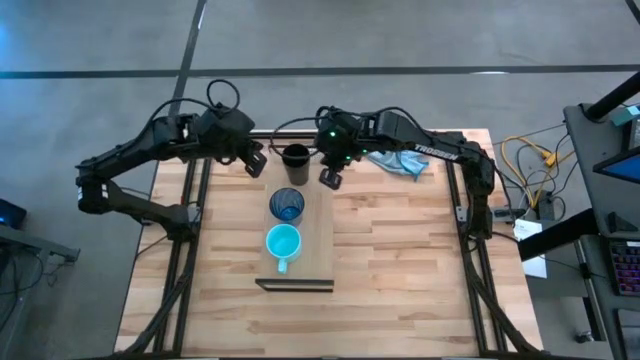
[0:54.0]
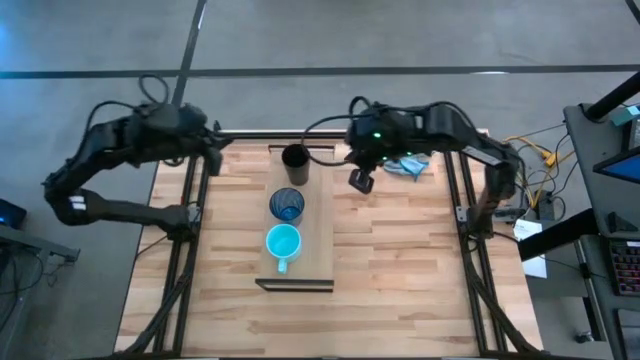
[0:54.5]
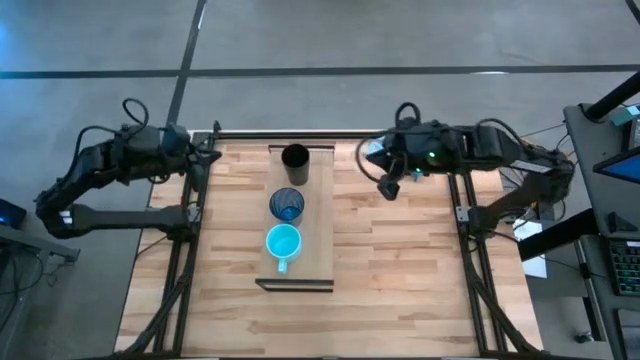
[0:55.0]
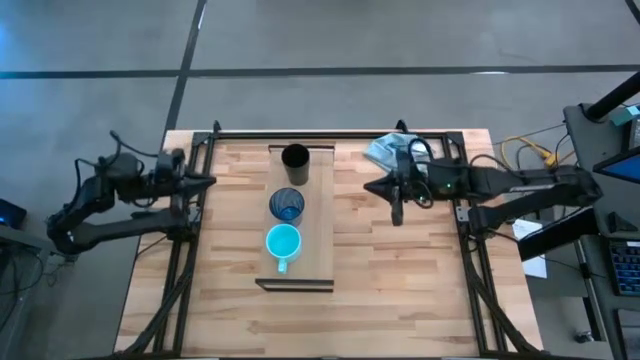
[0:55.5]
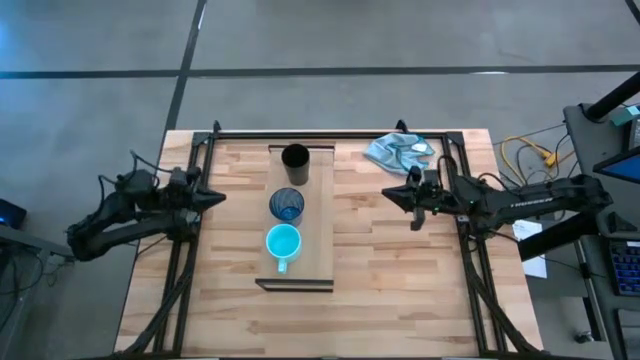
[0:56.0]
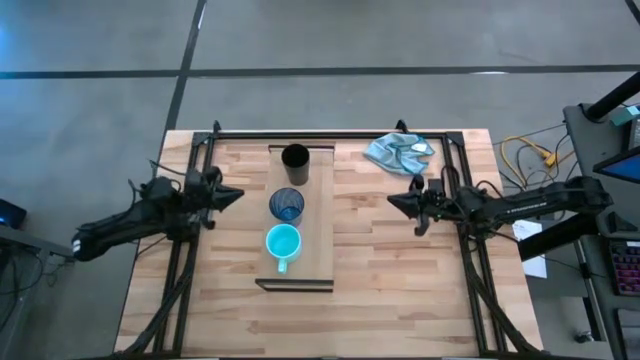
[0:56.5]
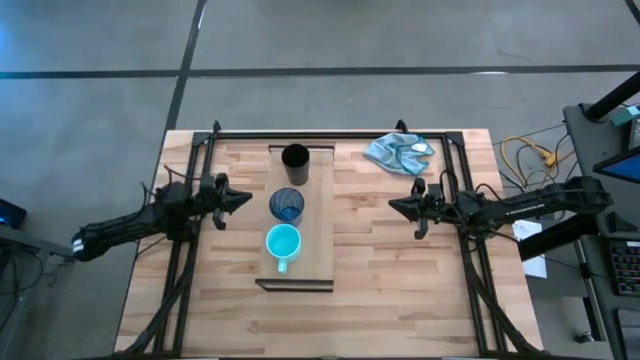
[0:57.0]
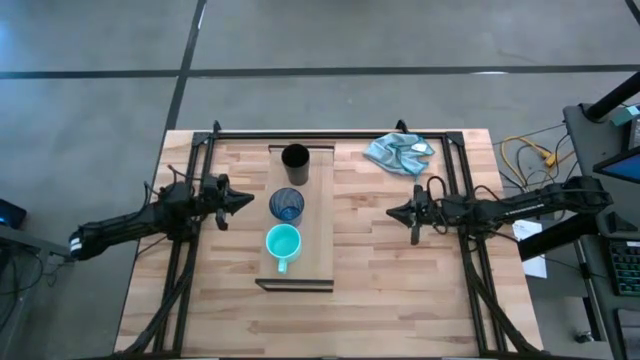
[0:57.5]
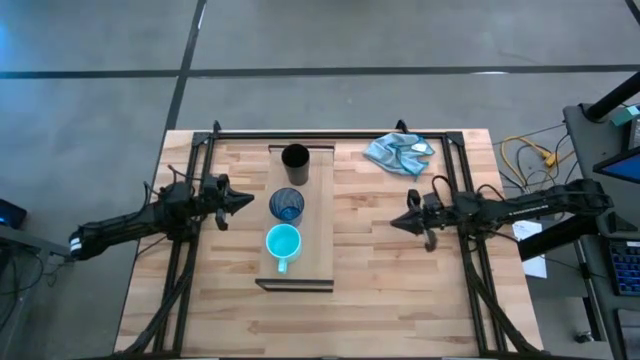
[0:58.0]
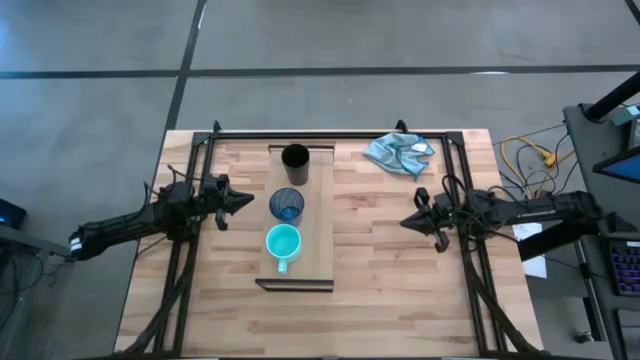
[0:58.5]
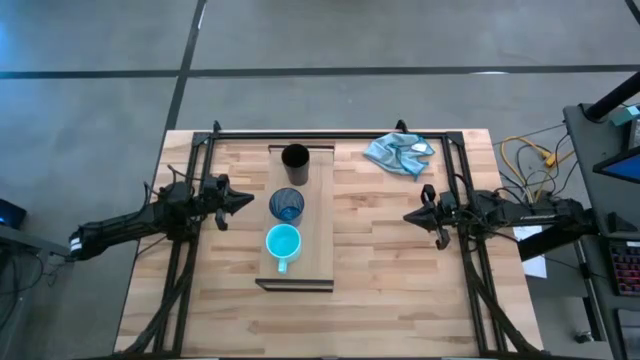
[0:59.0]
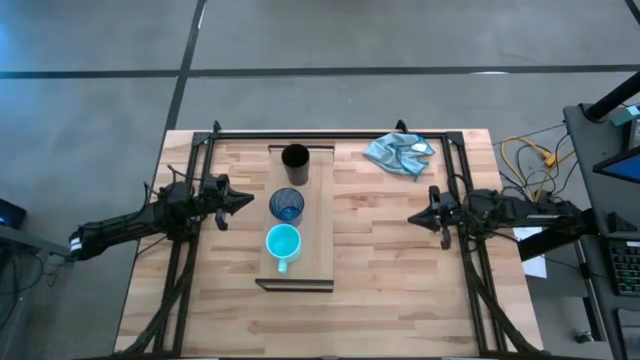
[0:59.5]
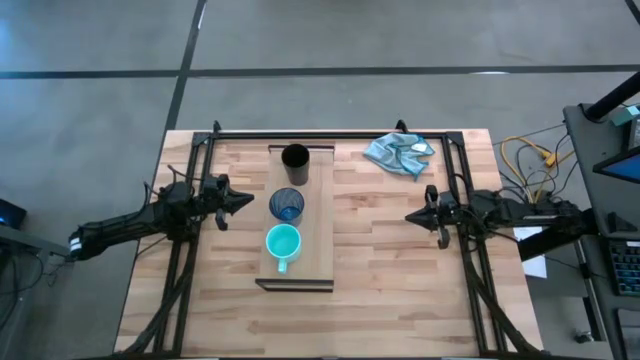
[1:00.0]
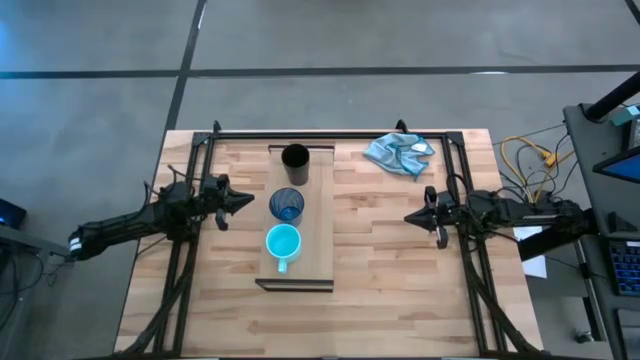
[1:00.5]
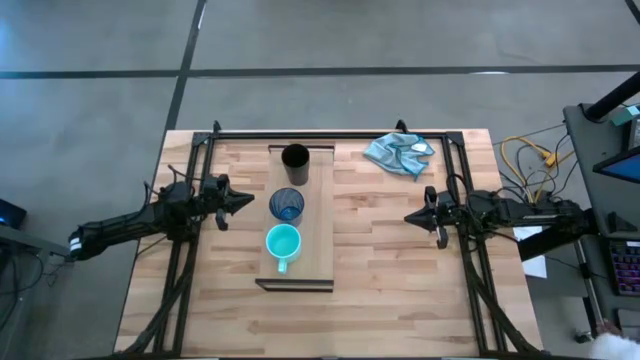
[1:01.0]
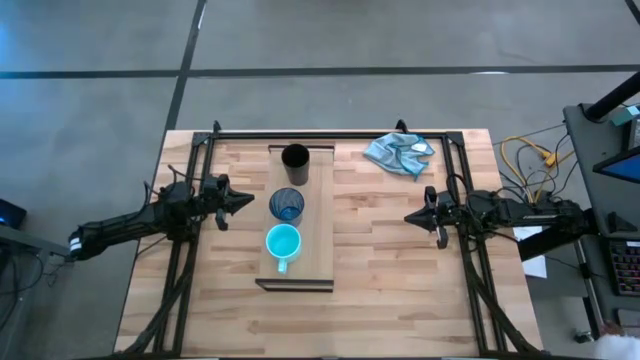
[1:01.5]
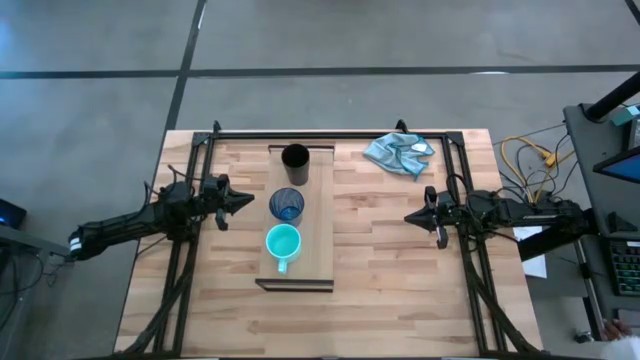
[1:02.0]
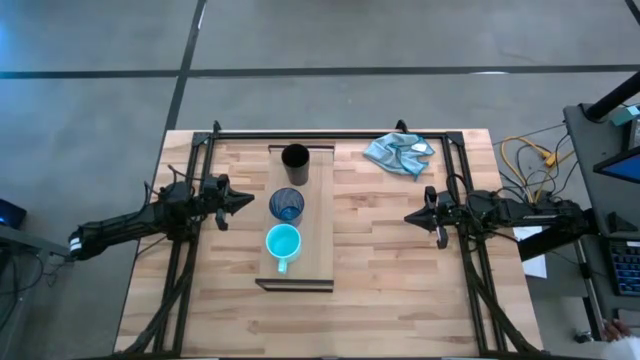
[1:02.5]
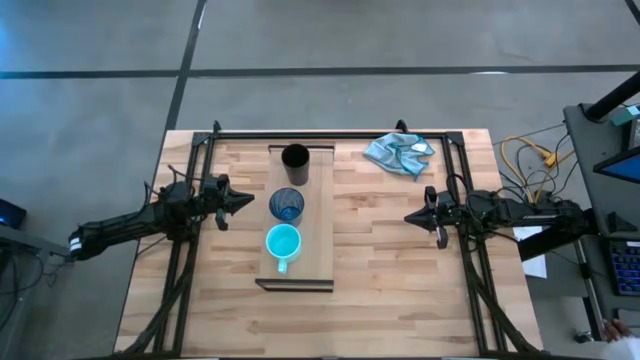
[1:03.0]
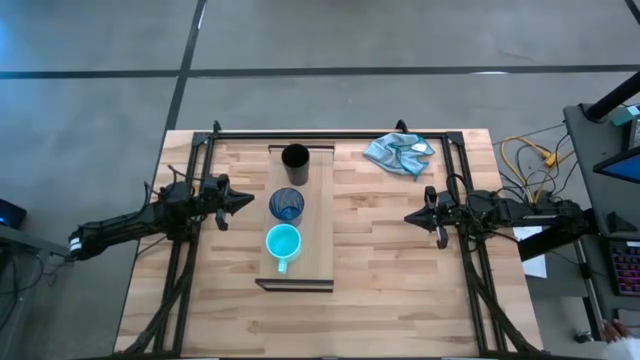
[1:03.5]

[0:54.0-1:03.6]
Task: Stack small to large cups/mugs on shelf
Return to Home Position

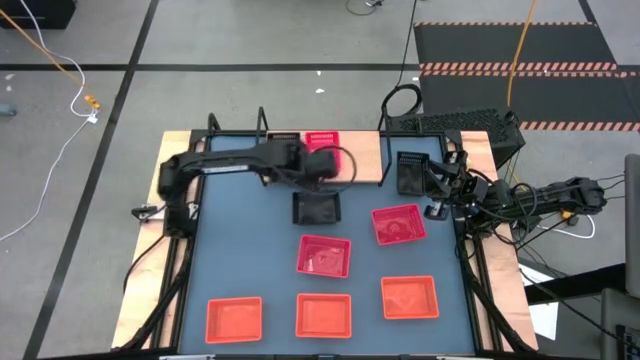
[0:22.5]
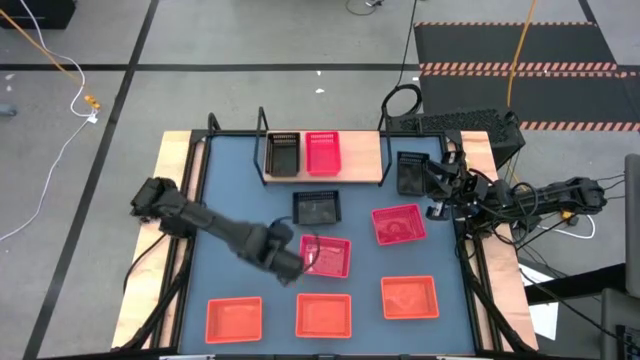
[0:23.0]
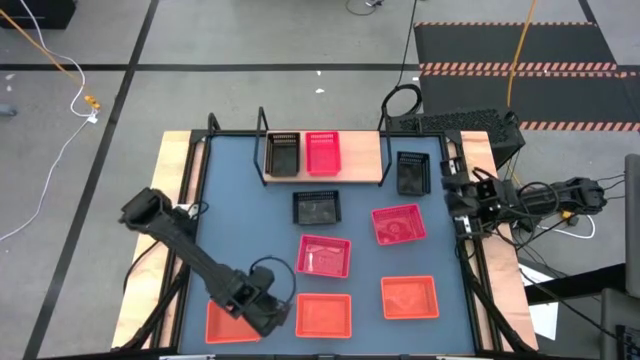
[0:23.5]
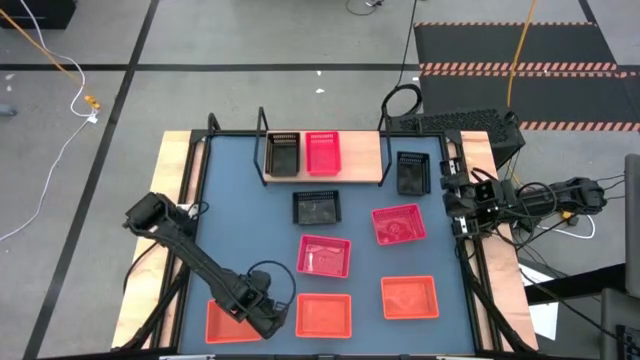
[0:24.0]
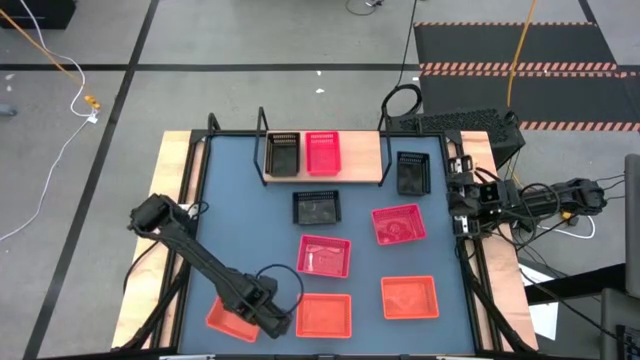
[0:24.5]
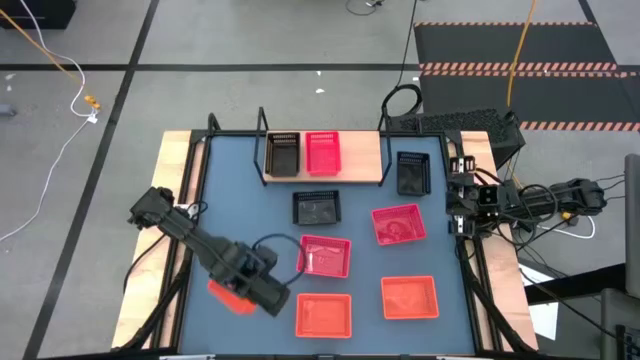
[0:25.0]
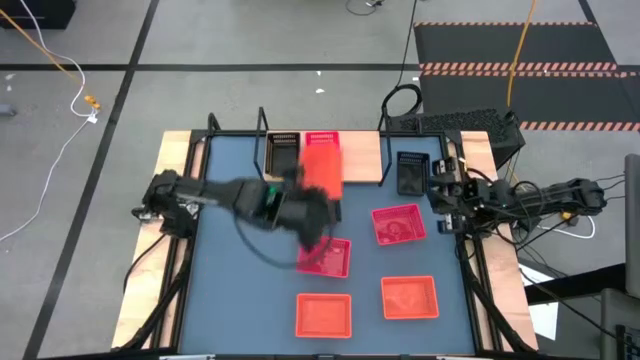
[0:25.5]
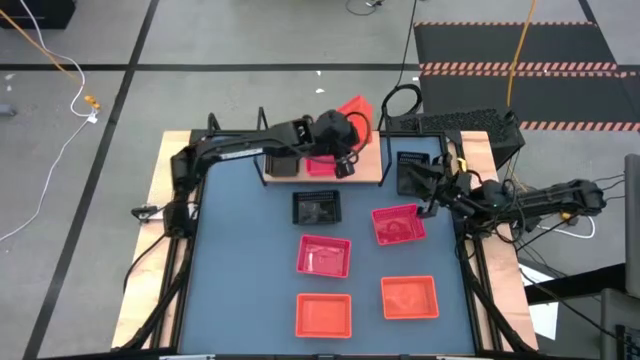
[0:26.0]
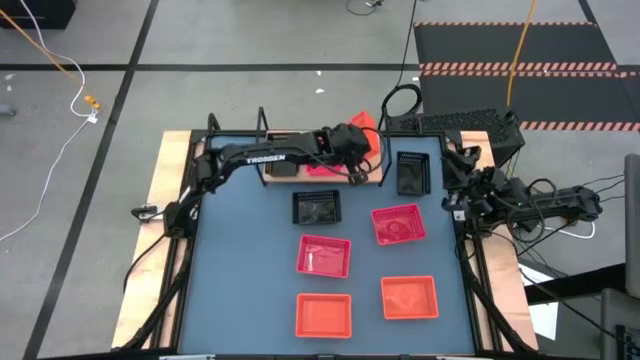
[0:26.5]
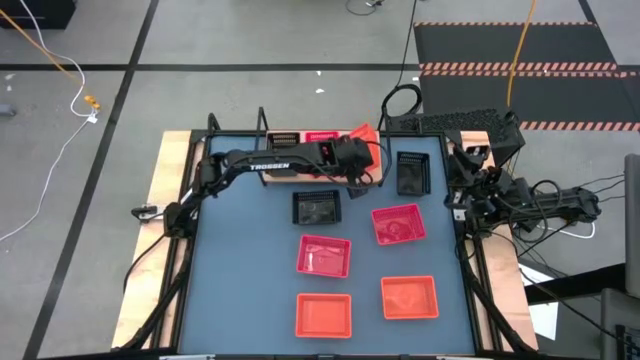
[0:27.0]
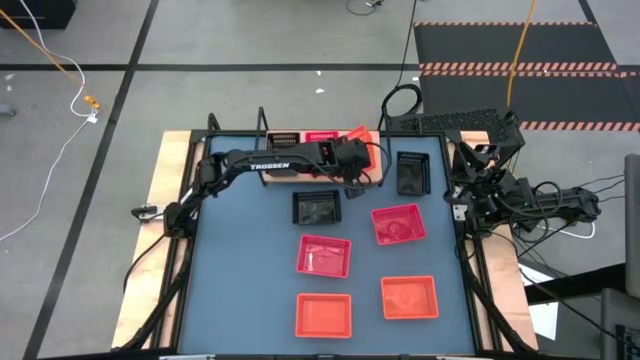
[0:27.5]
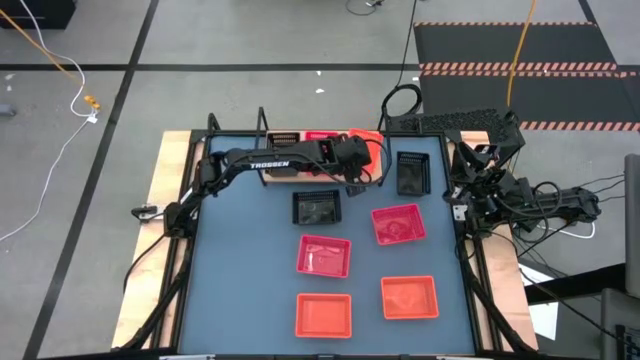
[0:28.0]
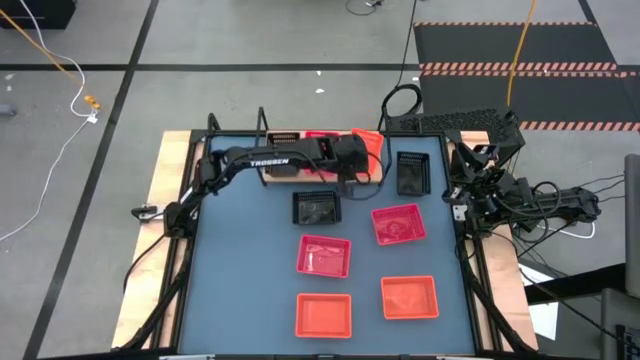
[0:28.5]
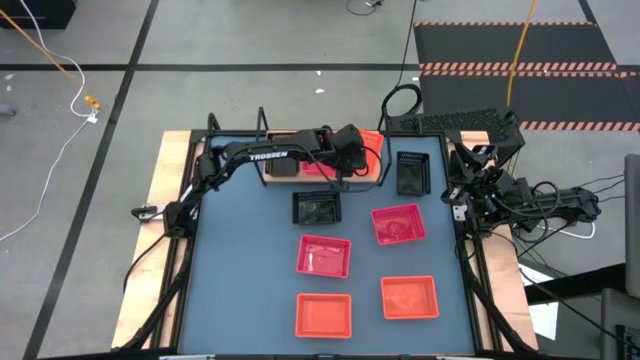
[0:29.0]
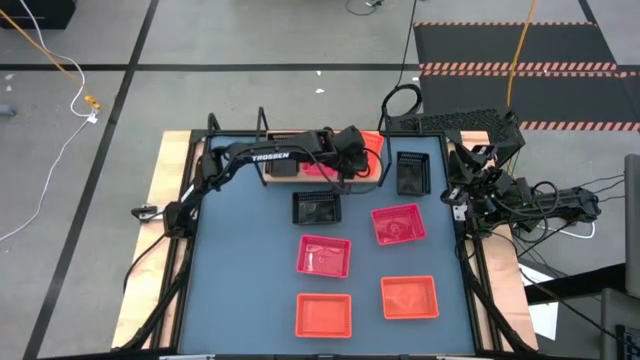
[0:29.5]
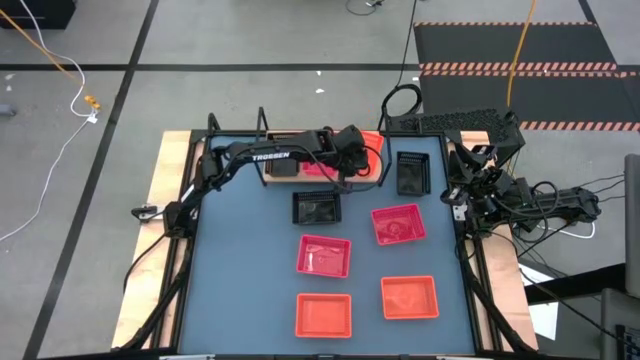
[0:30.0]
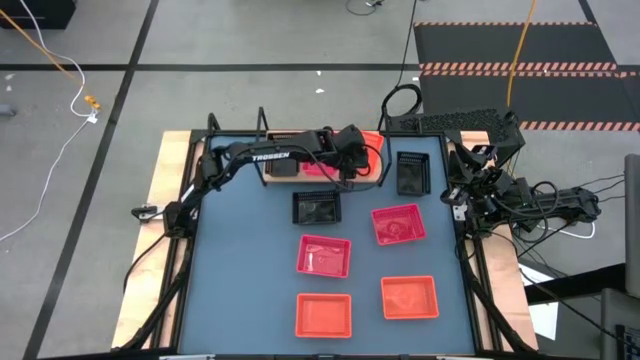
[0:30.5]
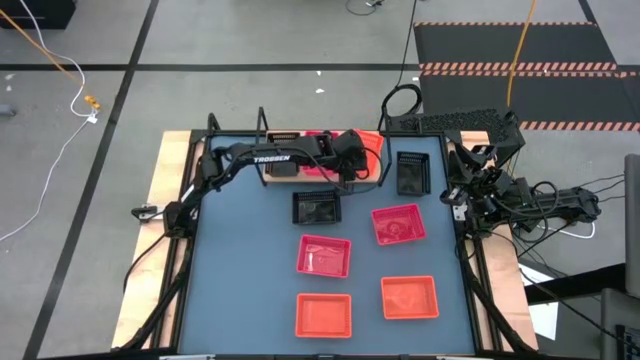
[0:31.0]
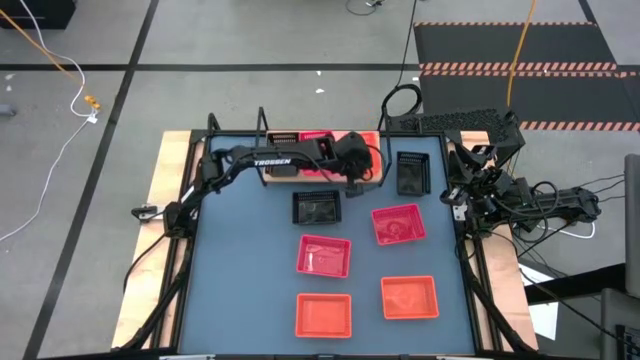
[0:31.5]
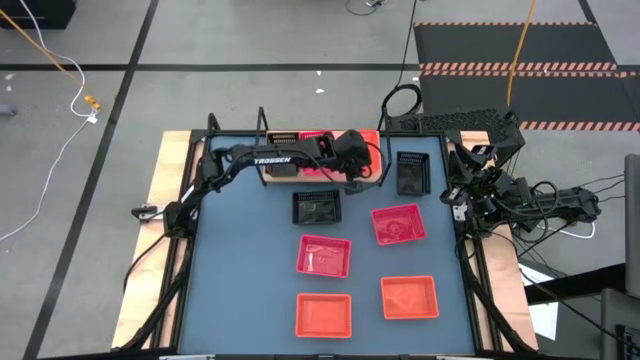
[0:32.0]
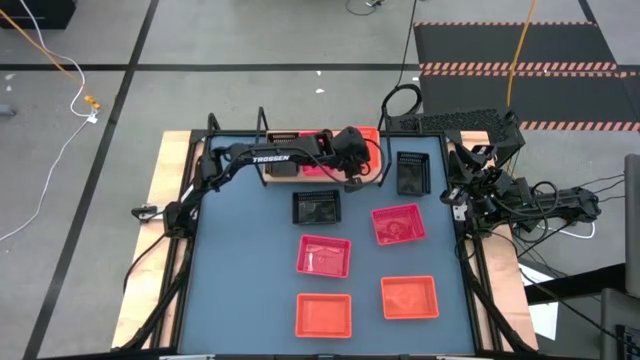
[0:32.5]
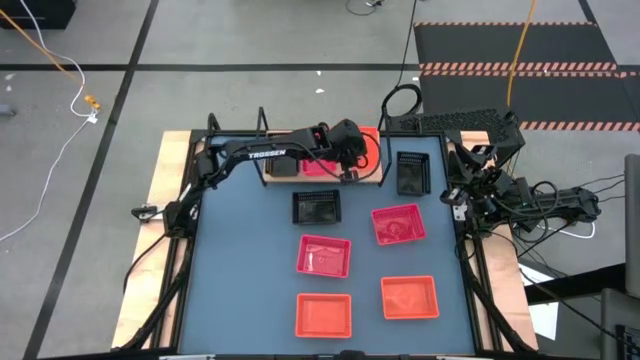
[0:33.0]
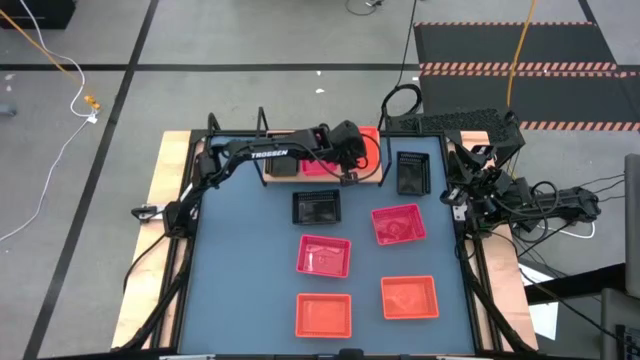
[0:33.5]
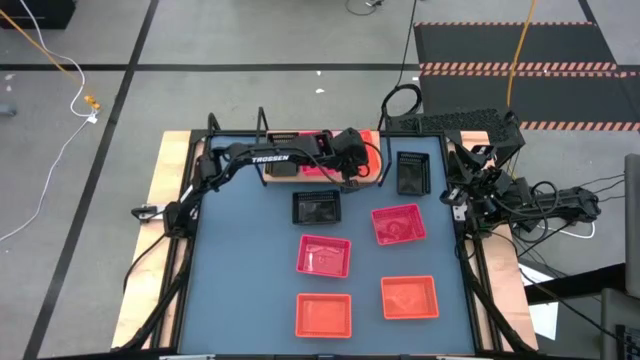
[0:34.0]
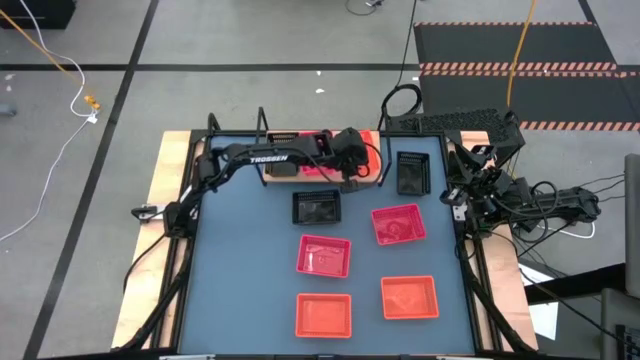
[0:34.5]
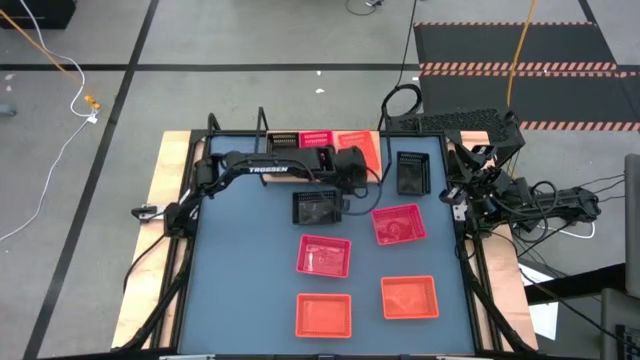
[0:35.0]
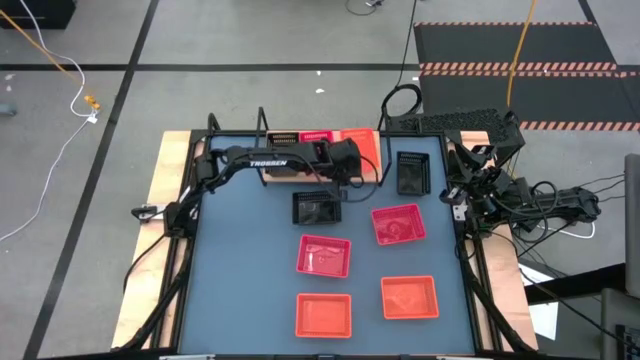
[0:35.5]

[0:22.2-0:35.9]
Task: Stack baskets on shelf by color
Put the left orange bin on the shelf
